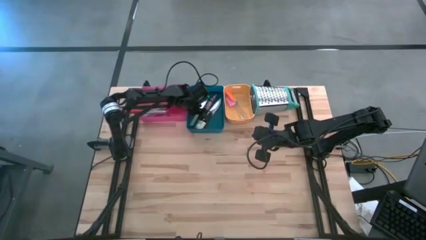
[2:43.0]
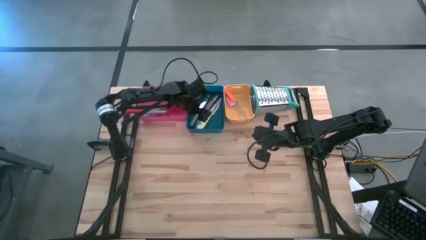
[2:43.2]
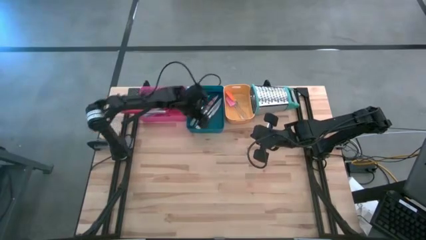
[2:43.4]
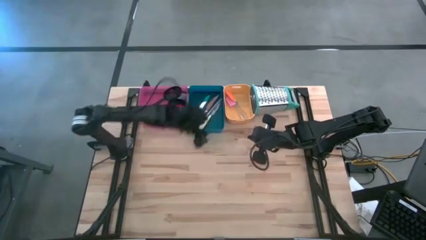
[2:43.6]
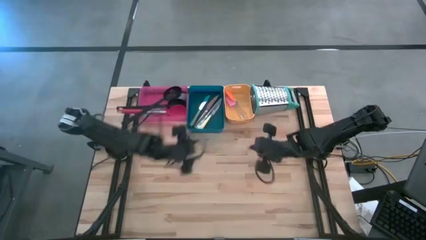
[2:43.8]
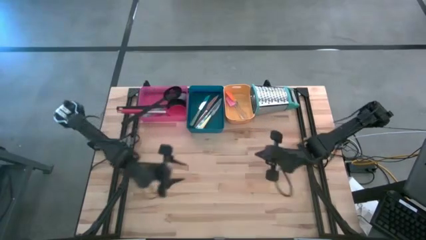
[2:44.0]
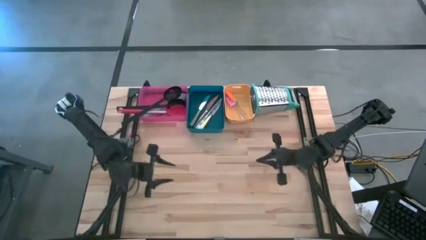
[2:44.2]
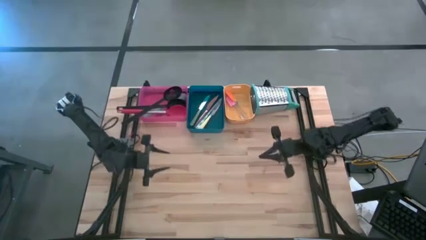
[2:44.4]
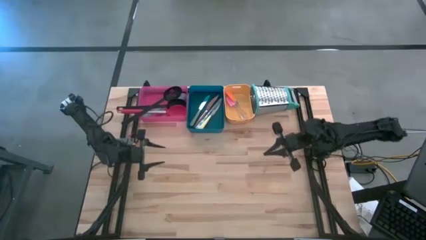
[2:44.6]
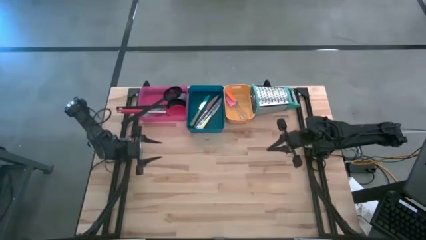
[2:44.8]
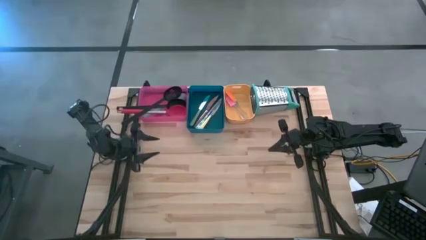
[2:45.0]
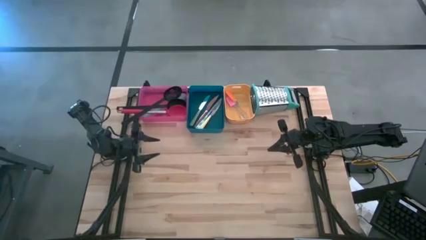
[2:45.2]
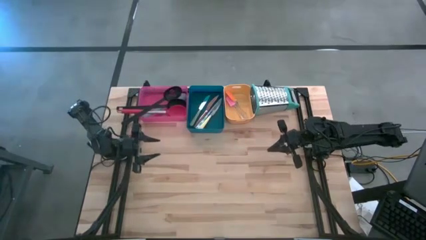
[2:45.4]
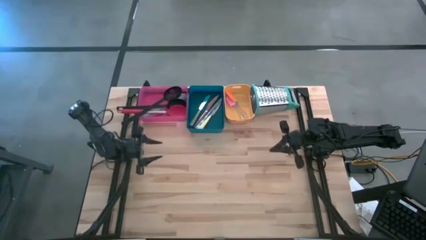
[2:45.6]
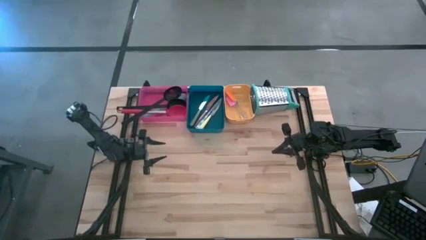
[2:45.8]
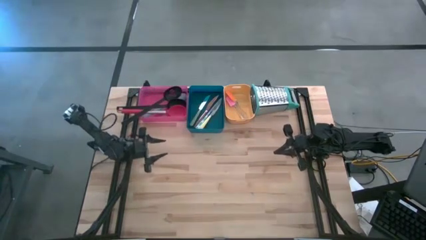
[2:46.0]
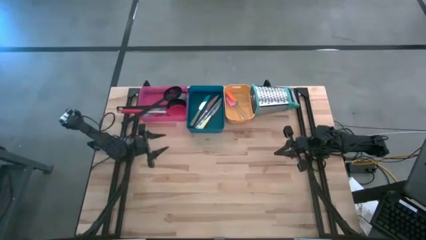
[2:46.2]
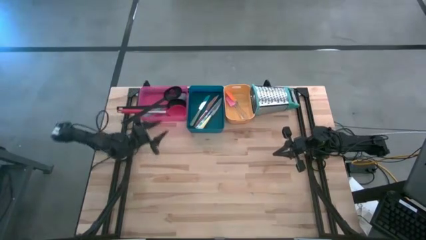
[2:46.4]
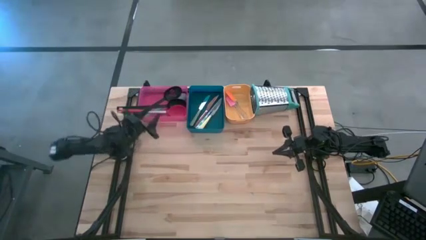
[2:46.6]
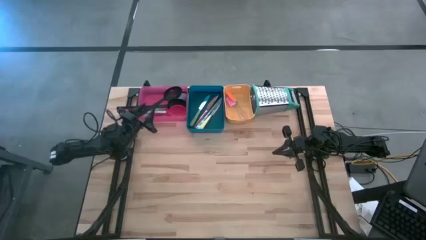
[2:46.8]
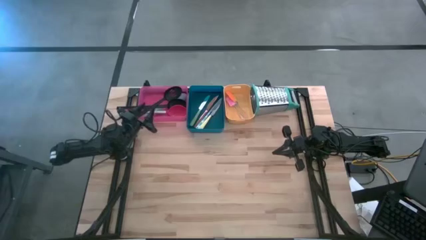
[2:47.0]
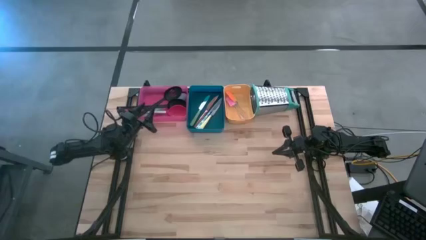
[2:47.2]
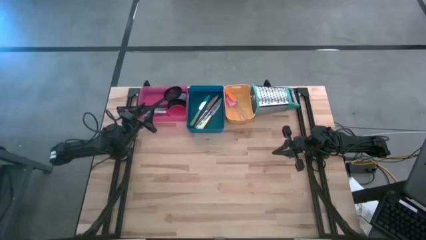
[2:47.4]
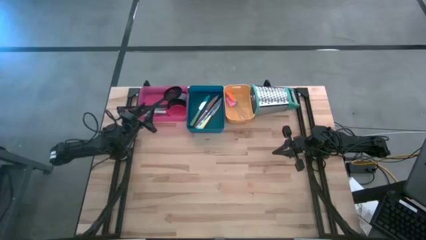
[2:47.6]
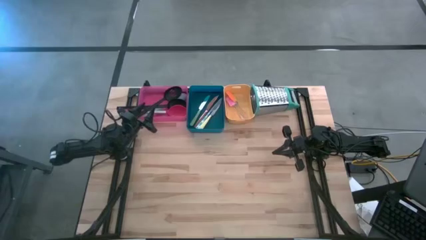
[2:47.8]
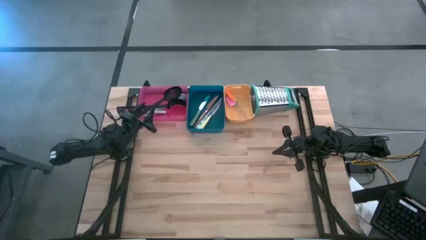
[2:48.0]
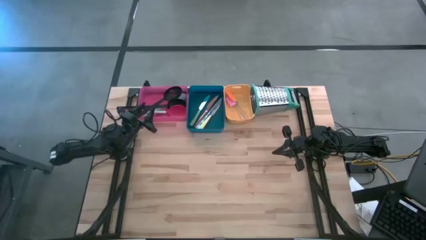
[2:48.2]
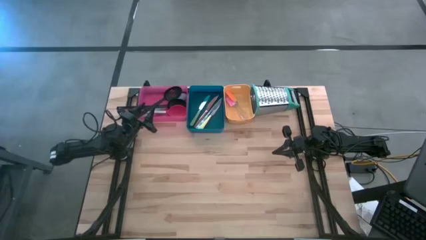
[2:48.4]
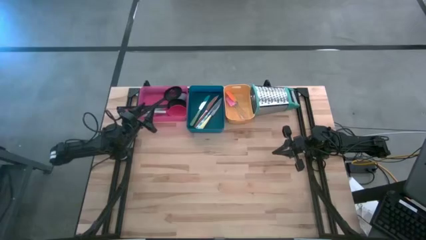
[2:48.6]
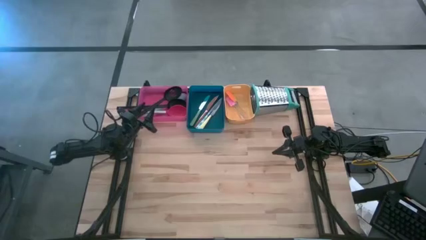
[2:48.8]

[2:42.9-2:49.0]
Task: Pick & Place Kitchen Items
Return to Home Position

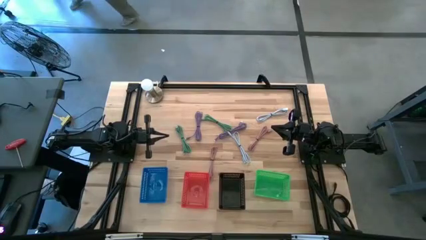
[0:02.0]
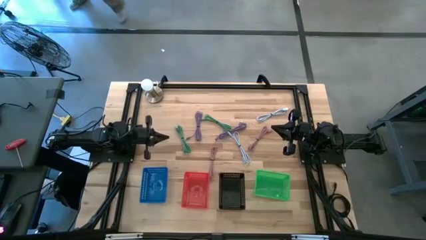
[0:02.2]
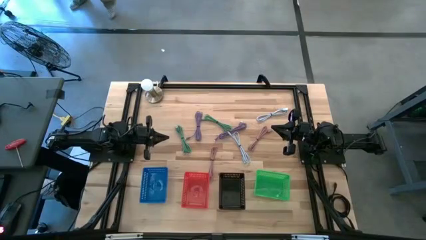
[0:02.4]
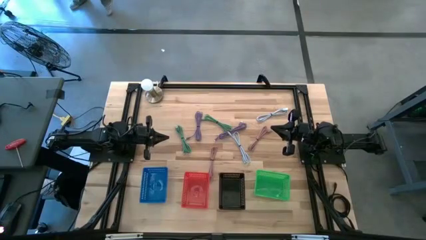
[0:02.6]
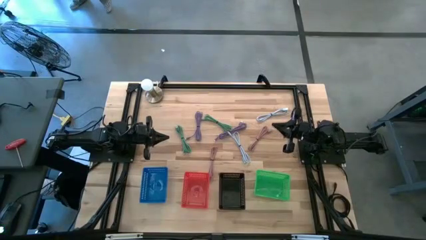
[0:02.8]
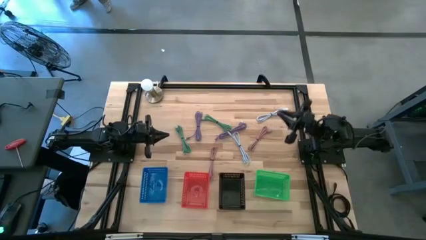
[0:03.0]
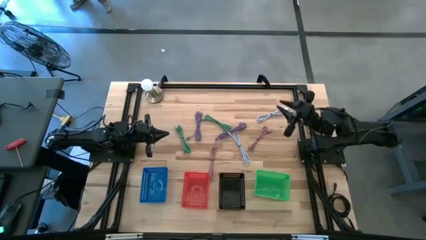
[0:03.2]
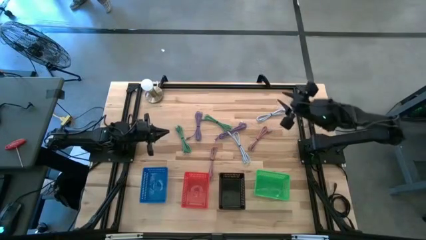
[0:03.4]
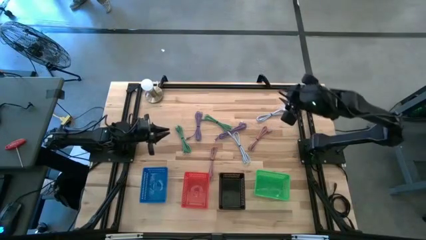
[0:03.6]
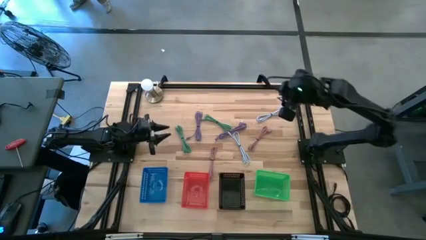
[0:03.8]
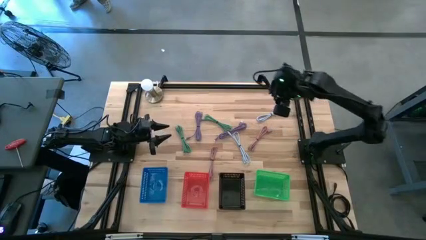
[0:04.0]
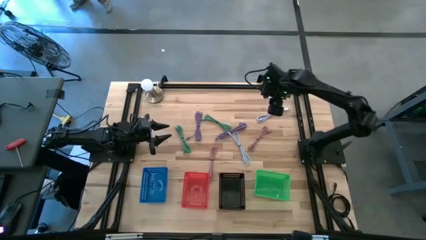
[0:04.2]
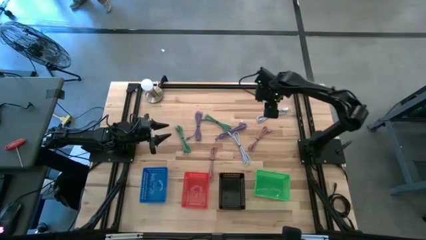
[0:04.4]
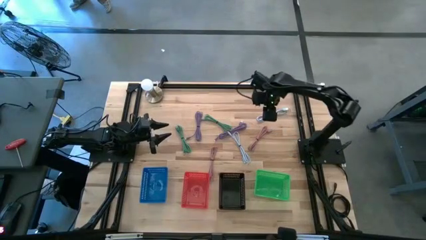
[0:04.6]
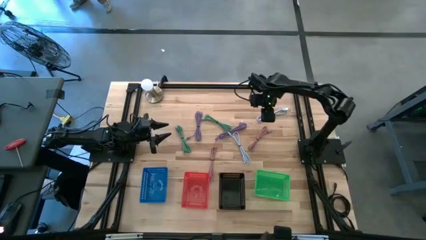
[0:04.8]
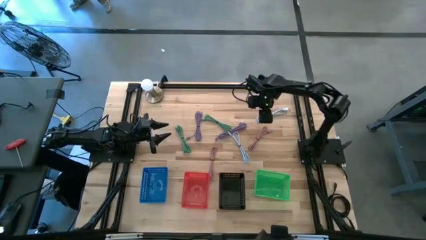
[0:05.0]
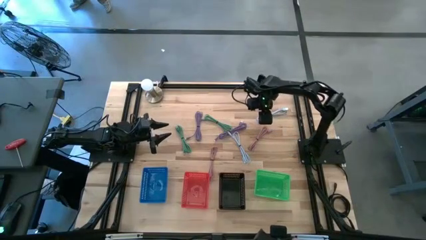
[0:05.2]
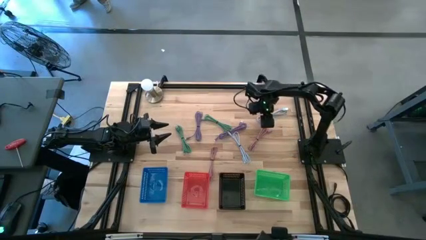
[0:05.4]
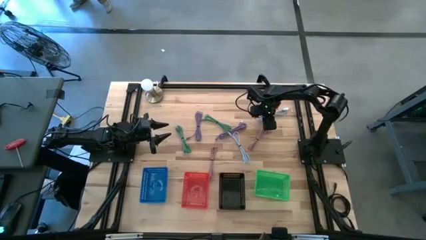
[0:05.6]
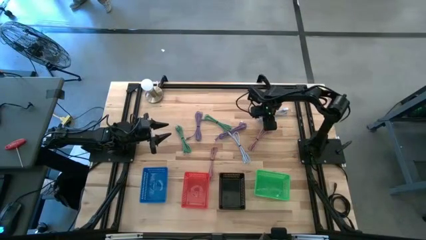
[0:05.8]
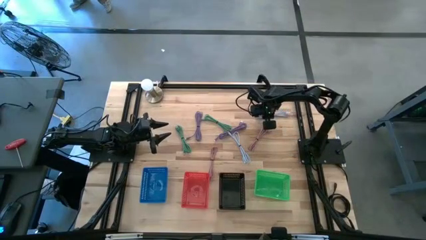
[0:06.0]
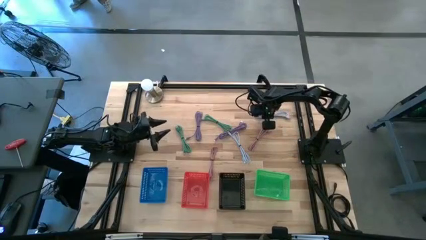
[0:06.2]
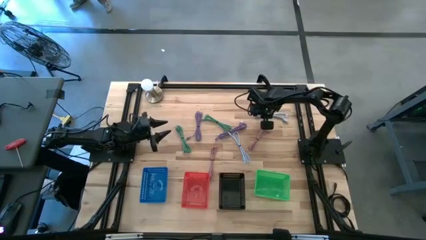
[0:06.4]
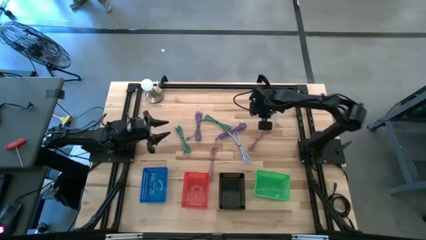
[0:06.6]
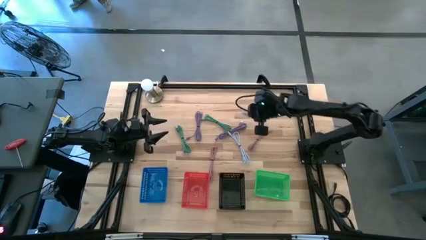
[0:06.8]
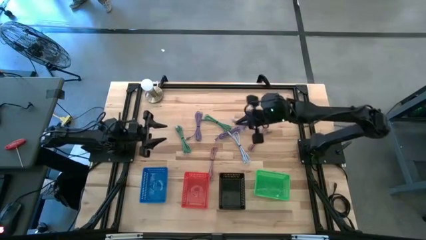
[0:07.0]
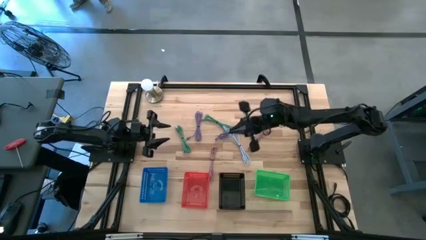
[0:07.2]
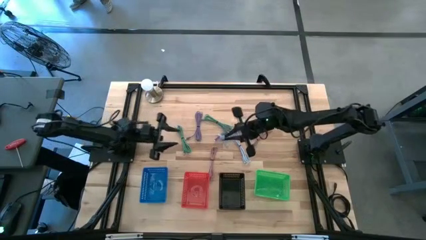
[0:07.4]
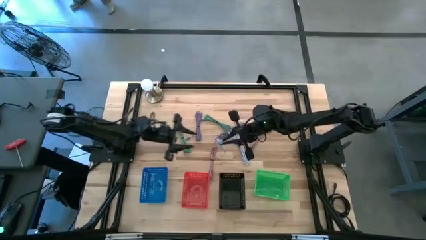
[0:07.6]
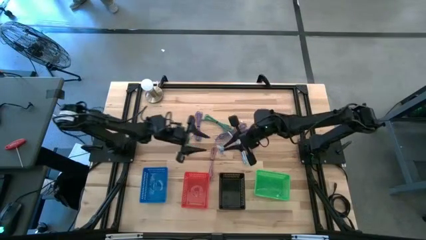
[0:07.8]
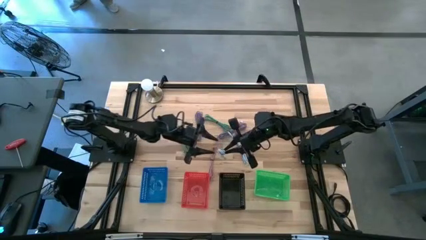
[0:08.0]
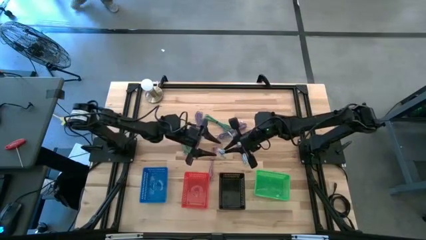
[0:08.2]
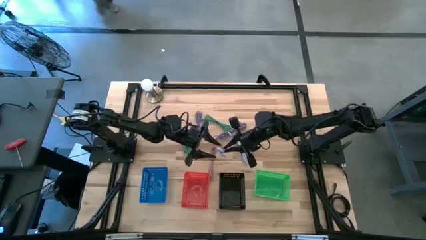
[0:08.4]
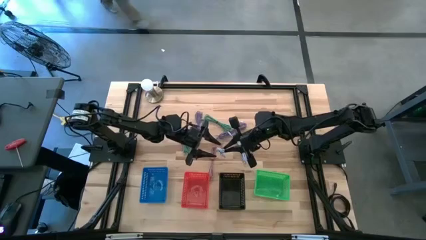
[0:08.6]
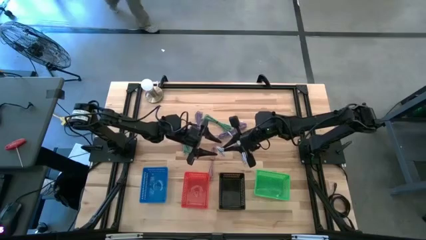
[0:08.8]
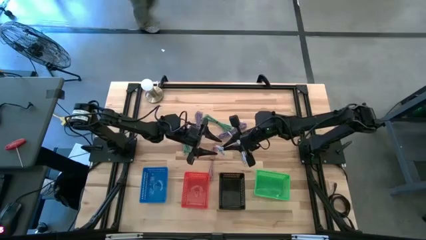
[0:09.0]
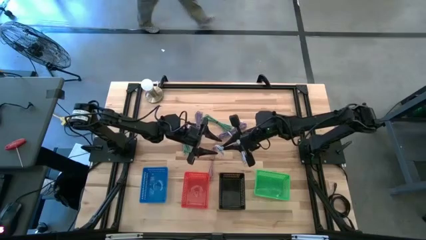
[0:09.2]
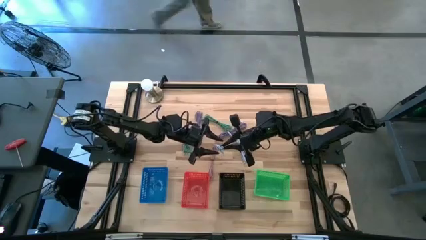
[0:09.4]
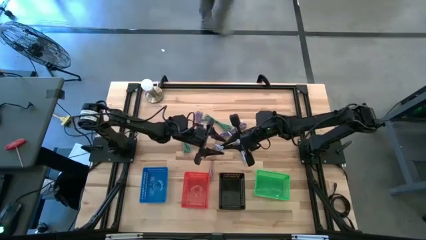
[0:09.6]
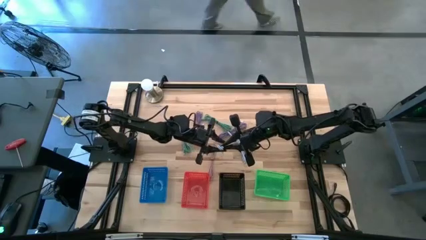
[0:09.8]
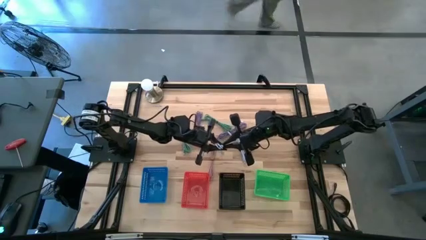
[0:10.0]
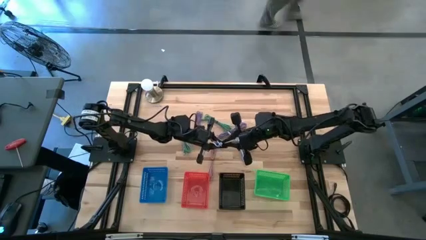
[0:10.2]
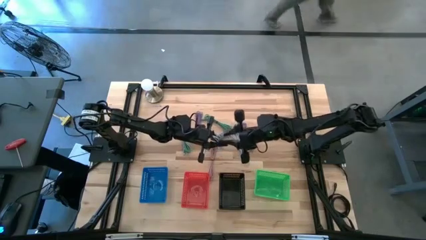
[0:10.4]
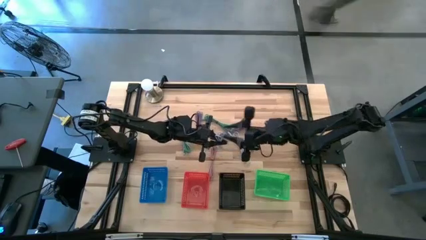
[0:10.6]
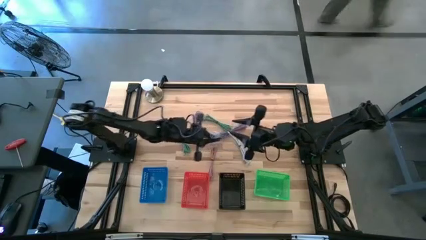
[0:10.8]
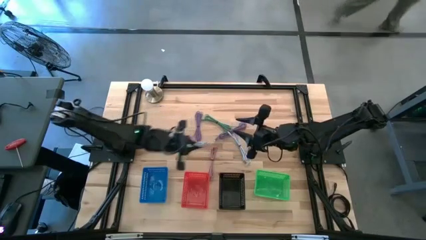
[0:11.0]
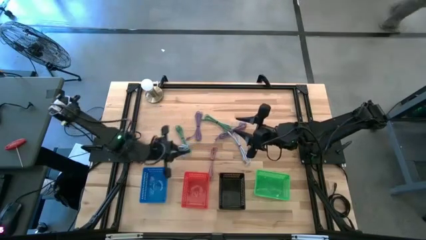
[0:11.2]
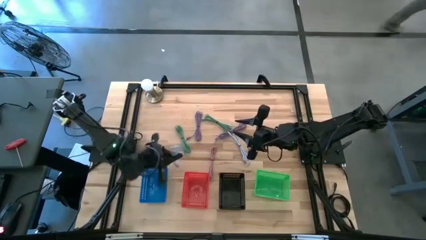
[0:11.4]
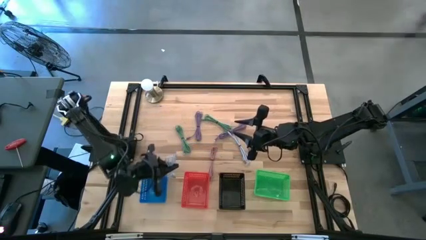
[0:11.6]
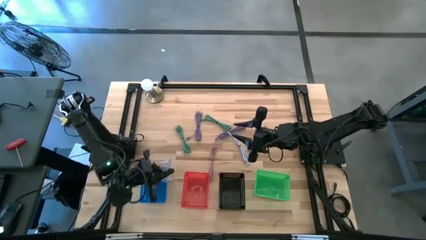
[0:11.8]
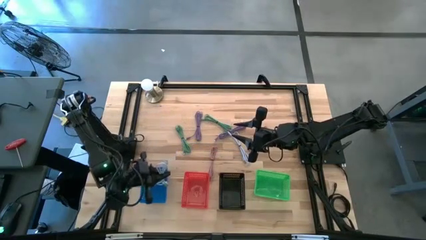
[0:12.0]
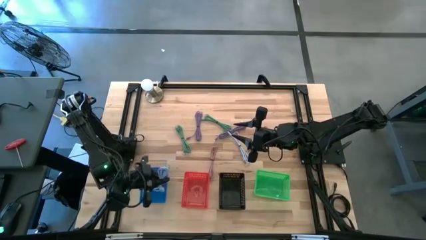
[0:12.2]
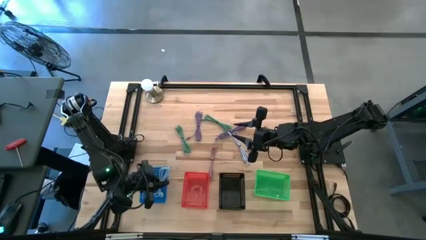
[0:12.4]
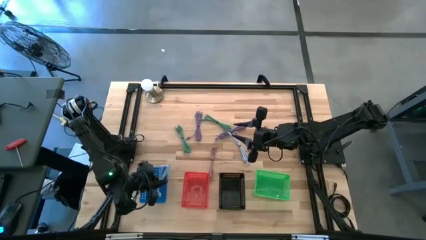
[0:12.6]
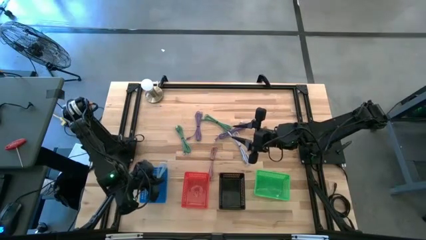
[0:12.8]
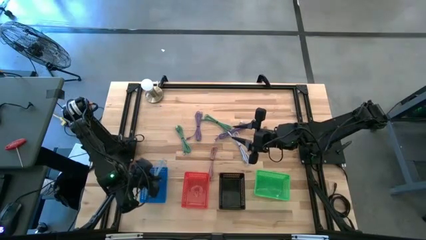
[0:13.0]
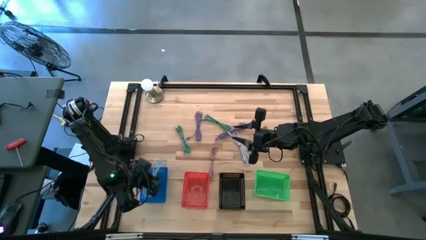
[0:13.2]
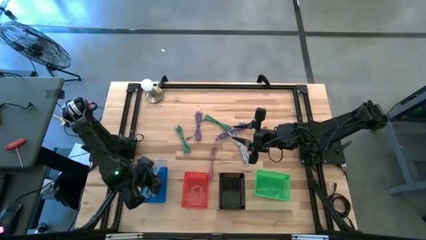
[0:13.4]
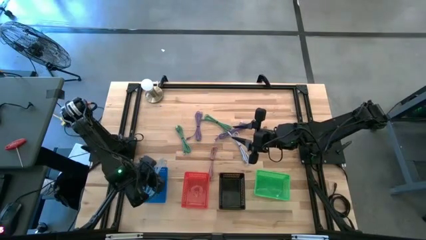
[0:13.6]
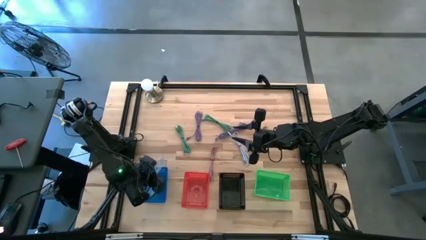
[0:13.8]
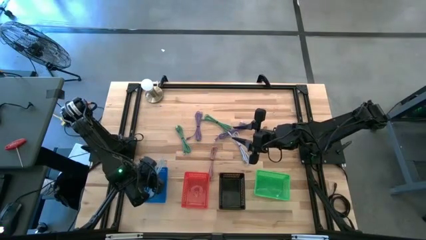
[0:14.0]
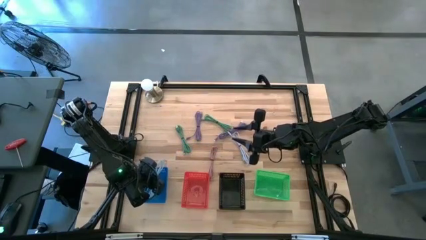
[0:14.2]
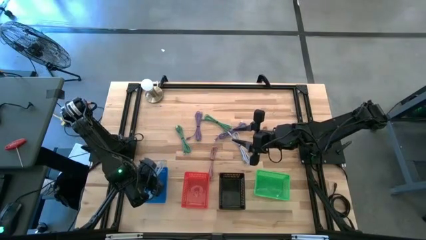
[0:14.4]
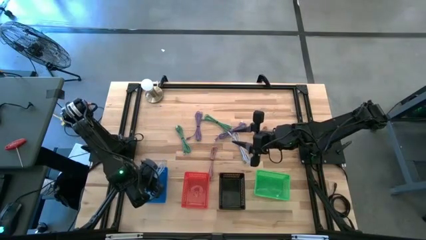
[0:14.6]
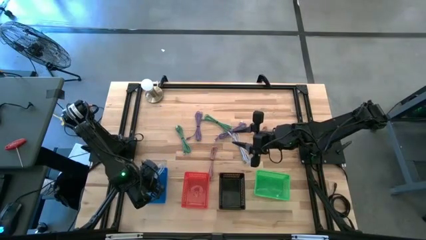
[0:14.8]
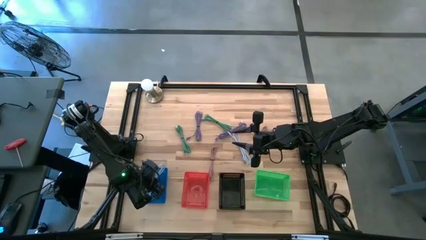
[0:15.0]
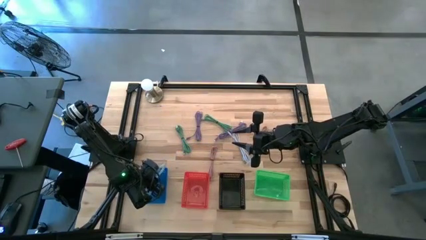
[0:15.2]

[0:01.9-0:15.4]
Task: Pick & Place USB Port
Put the top light blue charger cable into the blue bin
